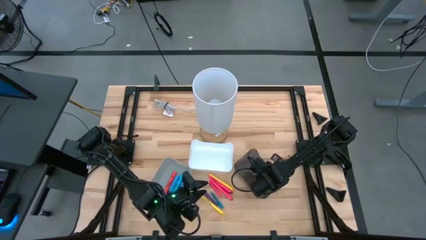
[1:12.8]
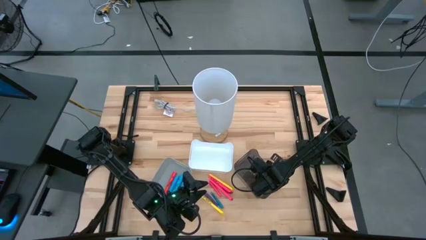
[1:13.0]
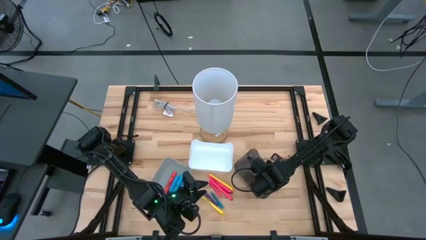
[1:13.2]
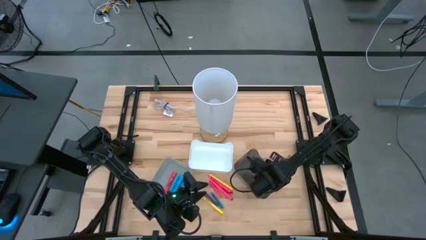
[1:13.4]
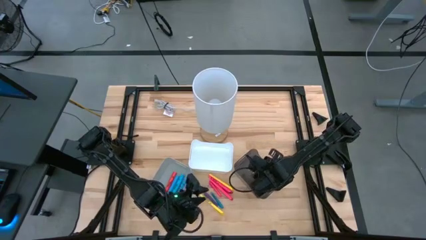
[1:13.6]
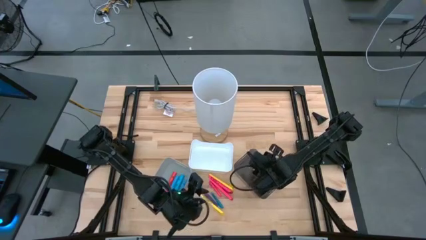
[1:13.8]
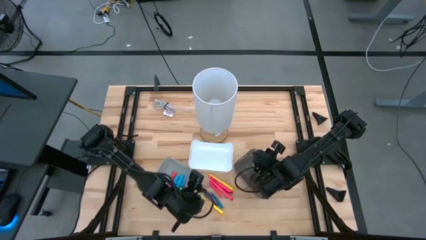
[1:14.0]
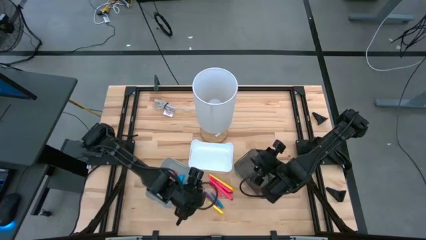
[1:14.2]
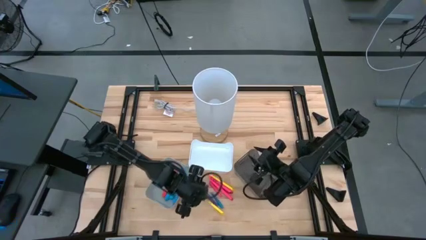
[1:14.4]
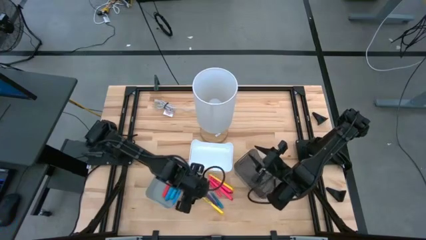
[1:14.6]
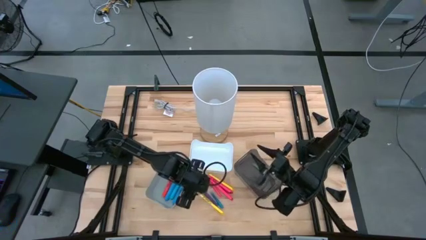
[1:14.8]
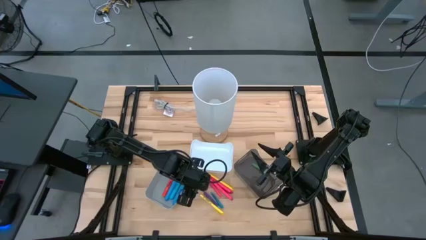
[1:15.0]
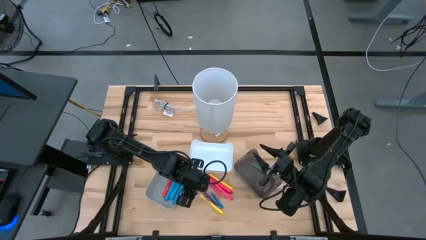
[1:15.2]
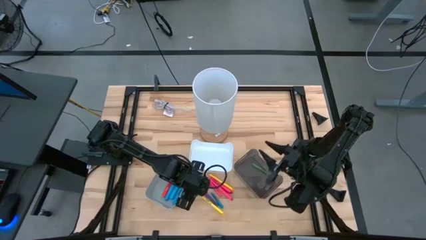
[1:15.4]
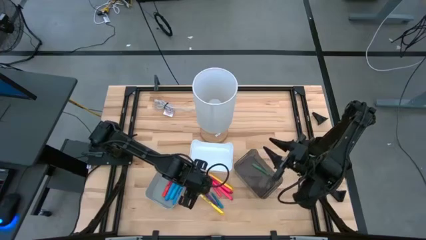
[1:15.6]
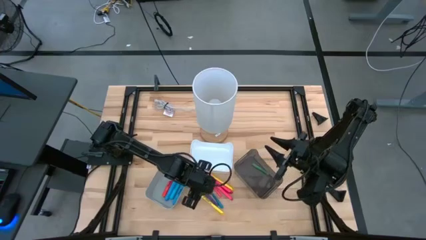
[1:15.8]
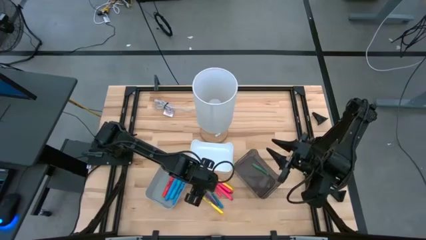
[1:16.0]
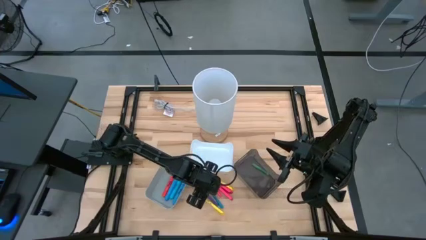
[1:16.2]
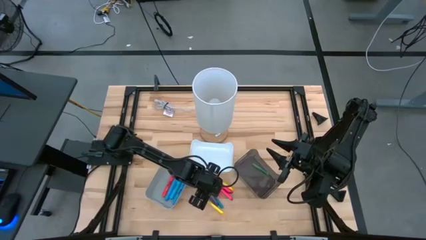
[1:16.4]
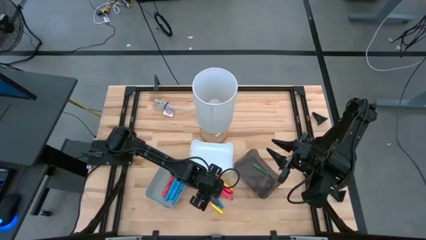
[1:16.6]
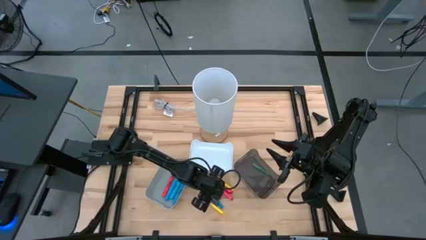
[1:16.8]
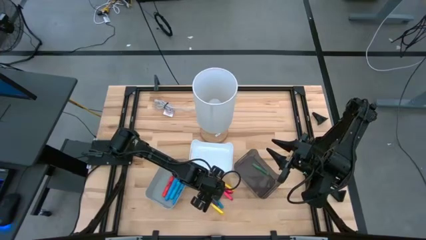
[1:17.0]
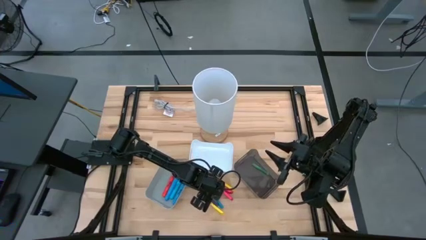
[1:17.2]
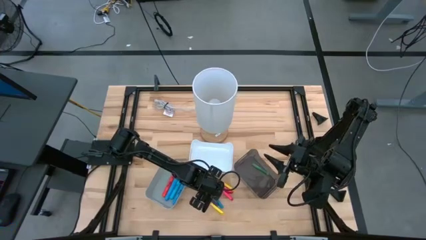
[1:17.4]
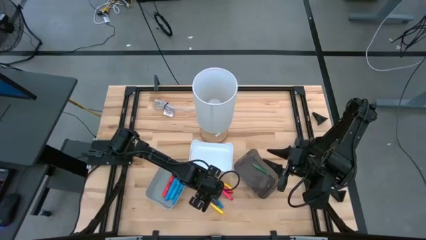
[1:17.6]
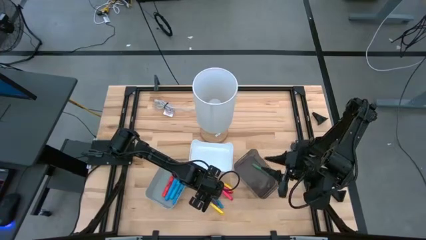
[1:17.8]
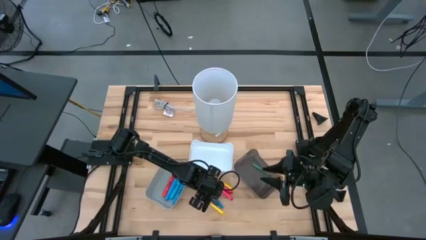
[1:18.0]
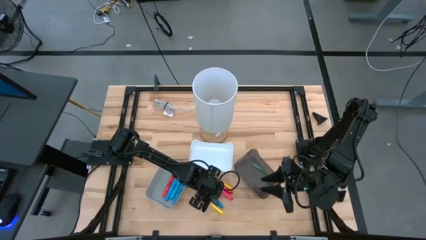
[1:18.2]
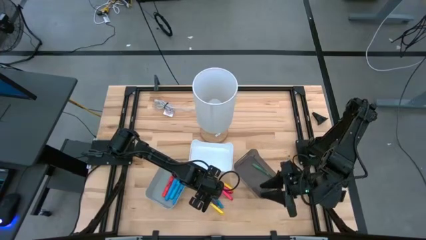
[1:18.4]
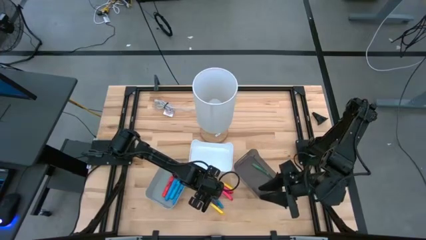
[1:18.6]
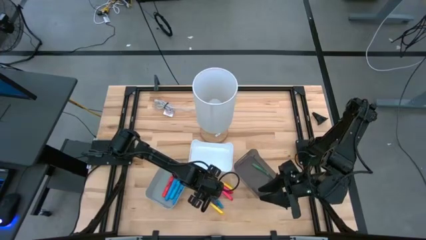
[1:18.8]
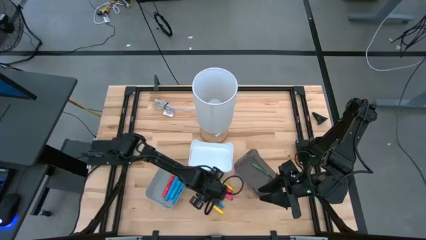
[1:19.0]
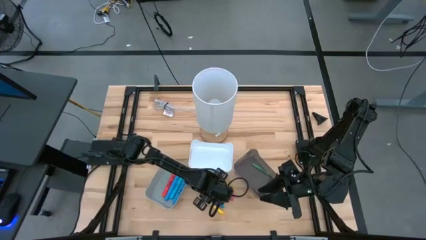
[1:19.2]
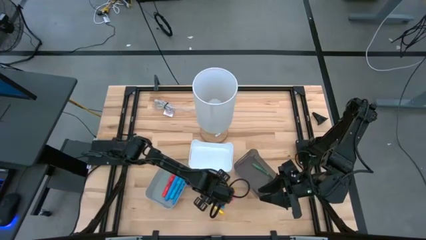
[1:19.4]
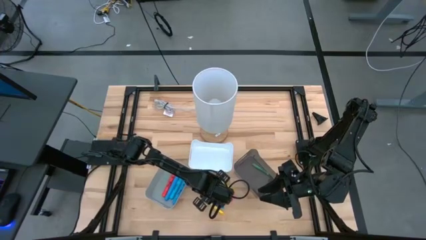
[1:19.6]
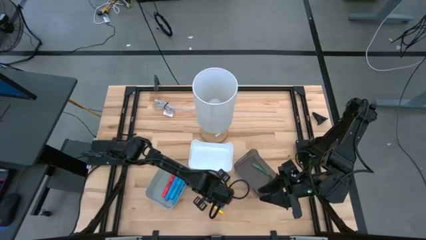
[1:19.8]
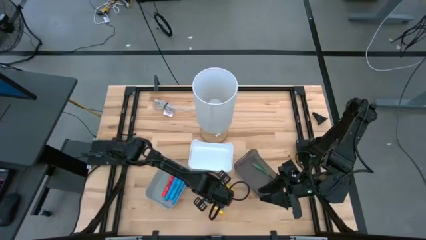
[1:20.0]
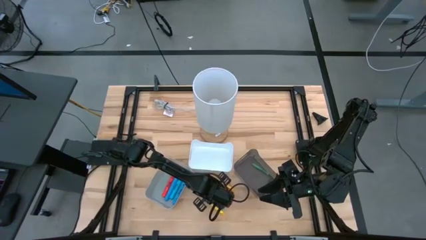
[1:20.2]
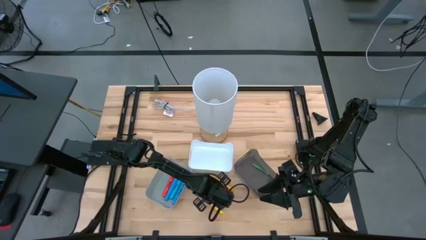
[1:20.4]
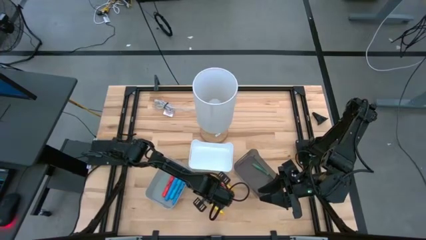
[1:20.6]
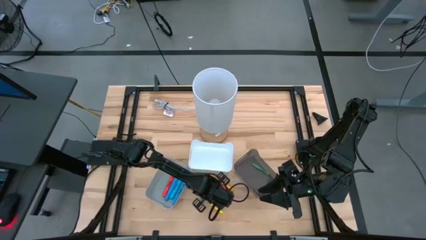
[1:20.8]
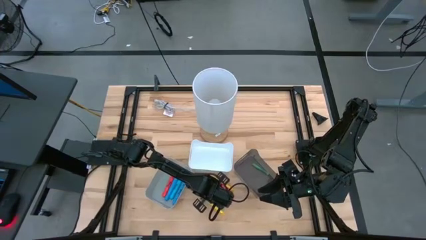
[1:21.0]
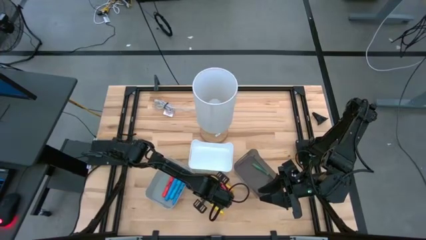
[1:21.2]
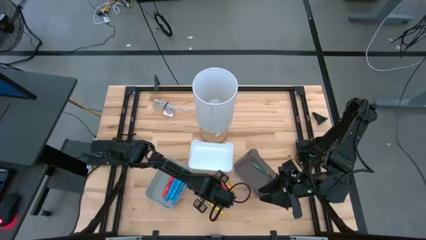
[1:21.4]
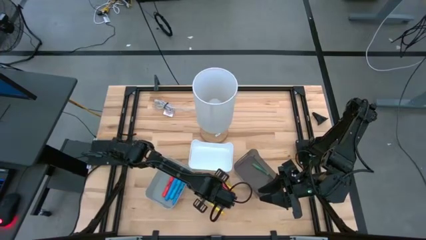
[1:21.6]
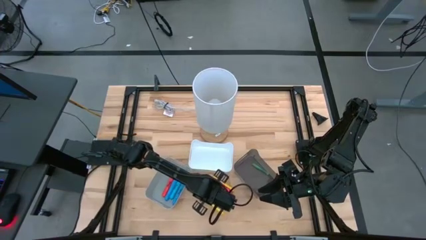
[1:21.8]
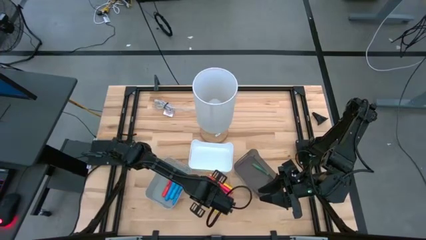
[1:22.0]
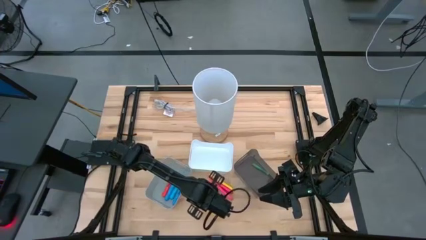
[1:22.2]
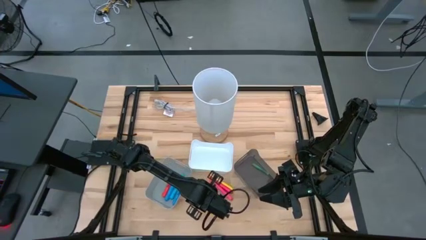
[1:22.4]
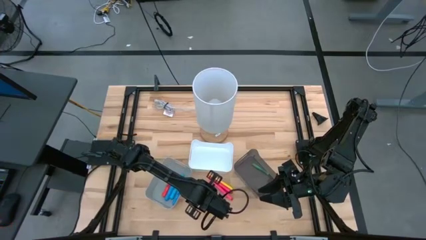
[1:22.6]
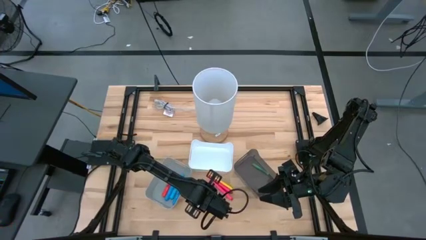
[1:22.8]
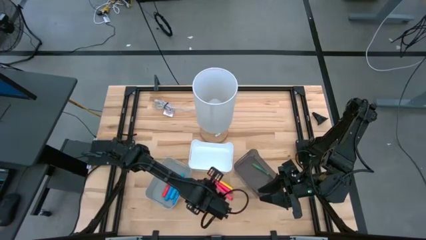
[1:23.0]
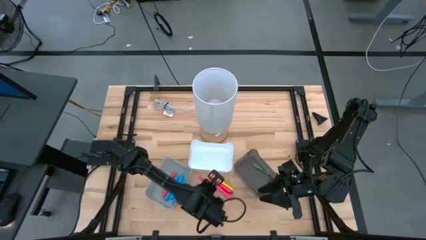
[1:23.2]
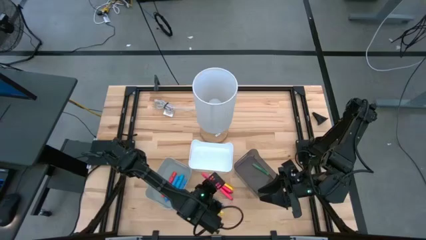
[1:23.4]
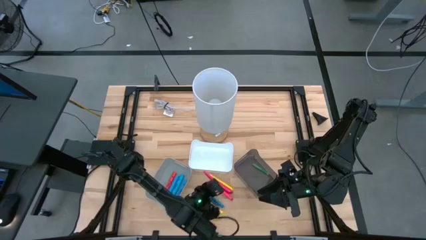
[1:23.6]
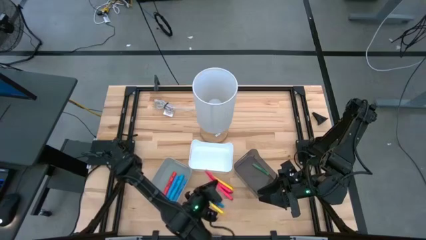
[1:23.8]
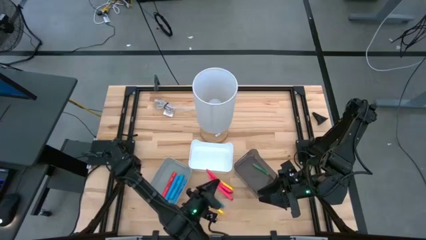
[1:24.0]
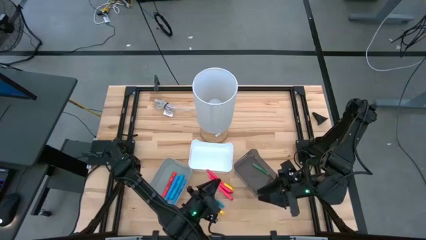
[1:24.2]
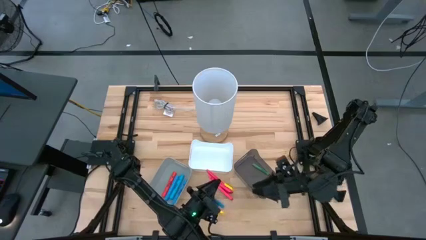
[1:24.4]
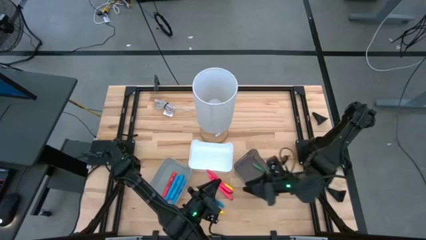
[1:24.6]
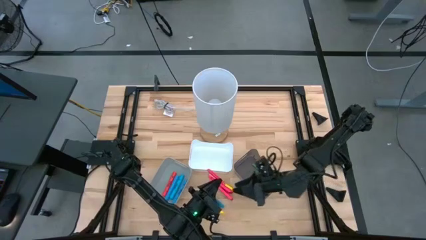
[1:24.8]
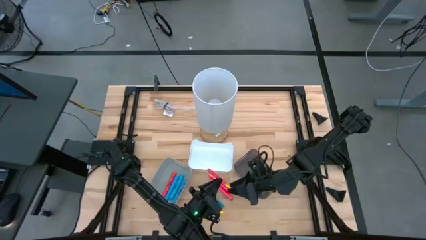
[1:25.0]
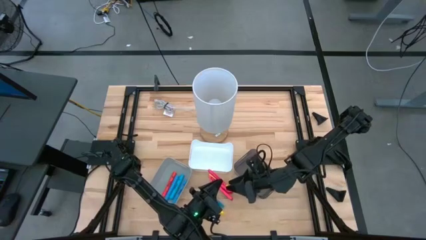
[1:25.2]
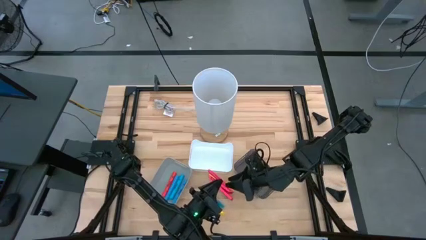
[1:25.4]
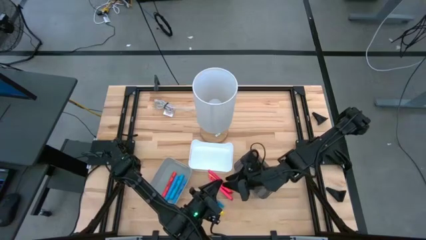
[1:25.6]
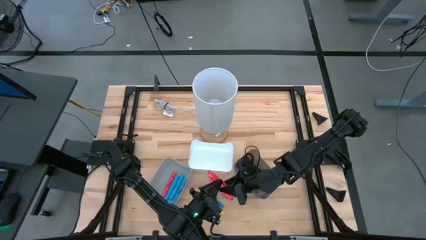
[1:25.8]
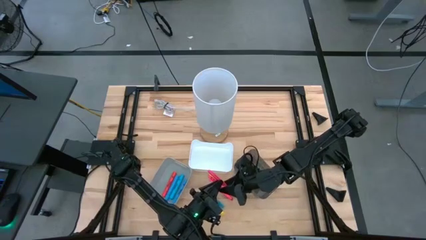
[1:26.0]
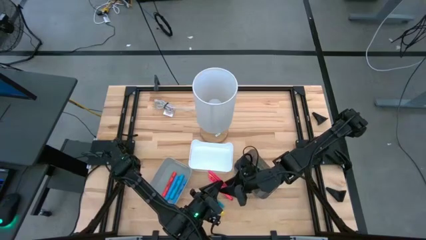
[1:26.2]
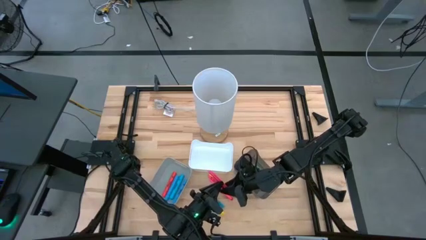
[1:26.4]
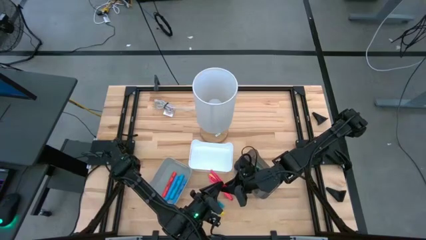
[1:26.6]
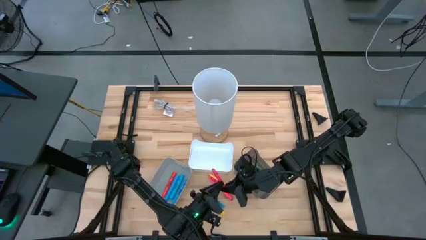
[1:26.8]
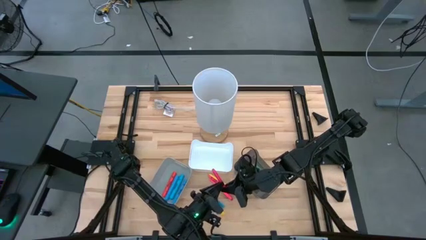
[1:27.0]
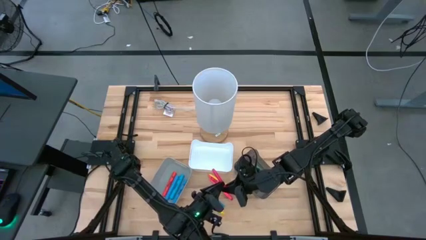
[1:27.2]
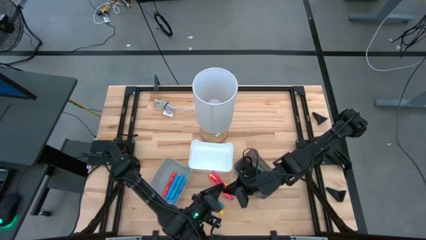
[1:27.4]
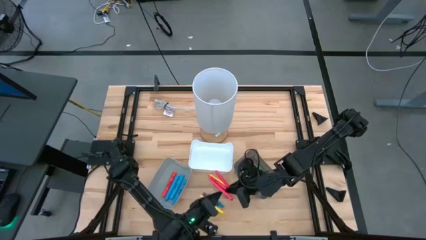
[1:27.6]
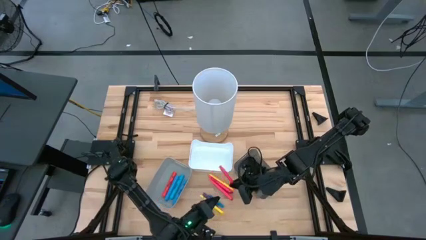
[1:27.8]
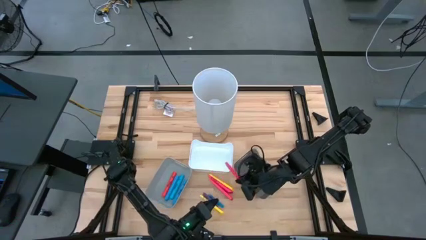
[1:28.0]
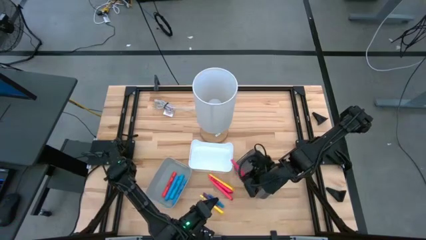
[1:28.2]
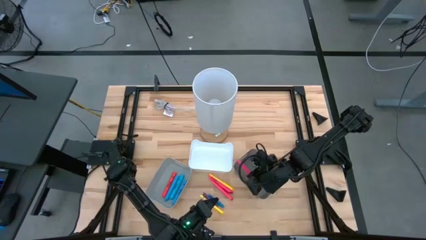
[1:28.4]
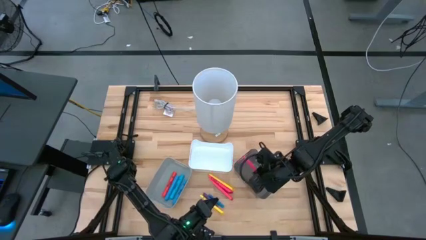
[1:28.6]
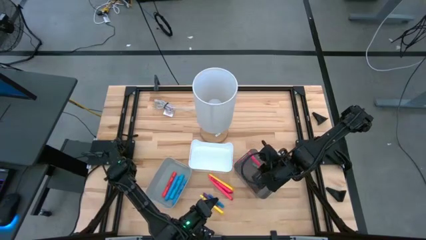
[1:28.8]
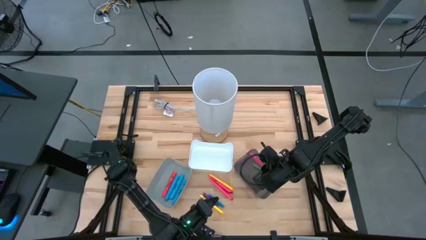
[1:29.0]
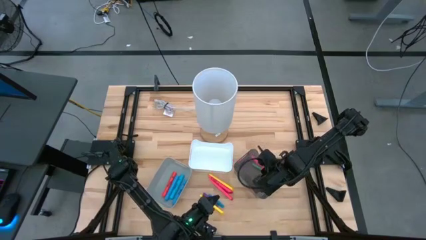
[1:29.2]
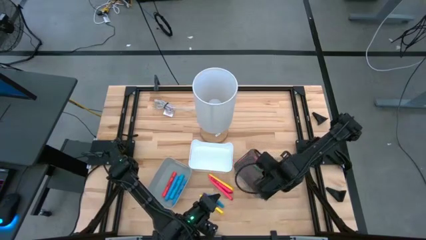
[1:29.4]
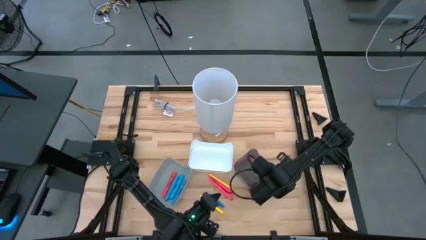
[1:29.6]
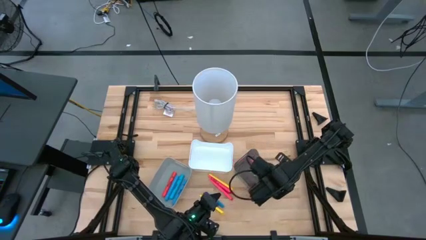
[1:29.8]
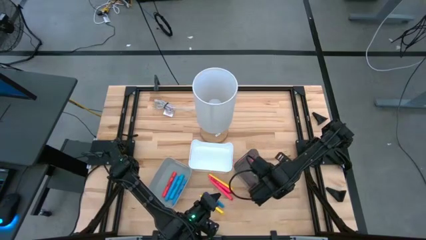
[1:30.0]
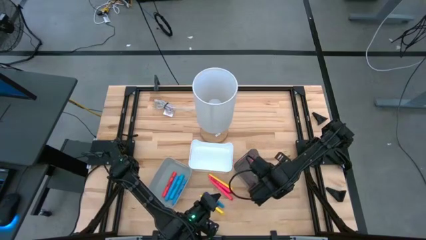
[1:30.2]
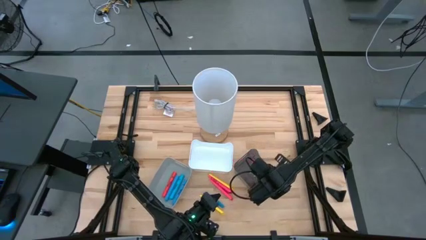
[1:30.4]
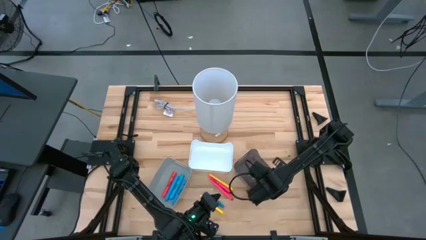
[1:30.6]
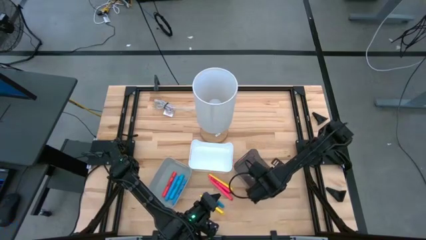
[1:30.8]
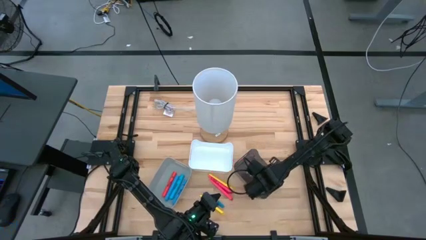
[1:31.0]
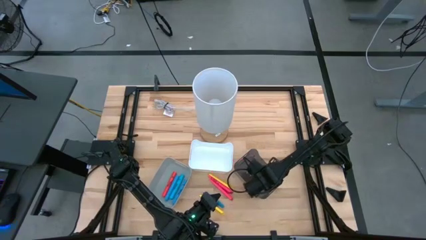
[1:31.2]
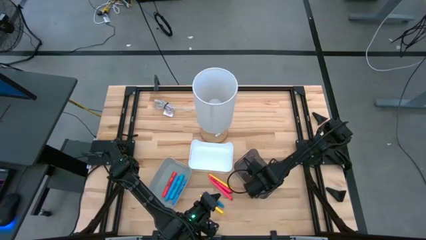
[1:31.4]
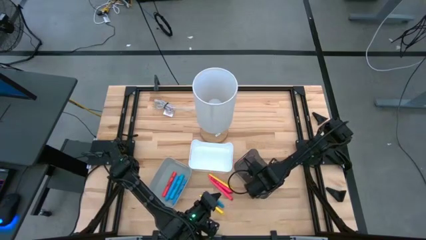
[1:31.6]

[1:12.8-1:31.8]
Task: Pick & Place Markers
Put the pink pen in the black bin
